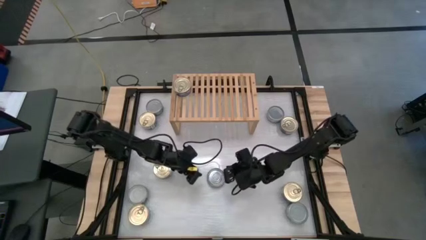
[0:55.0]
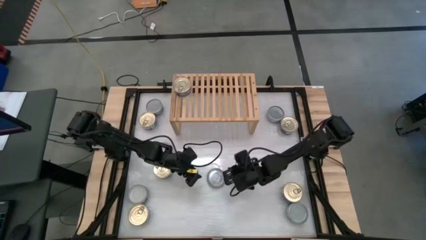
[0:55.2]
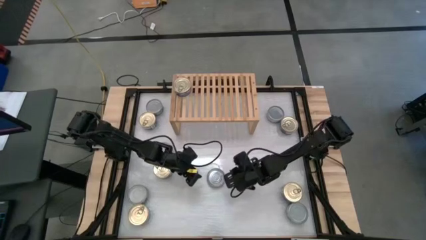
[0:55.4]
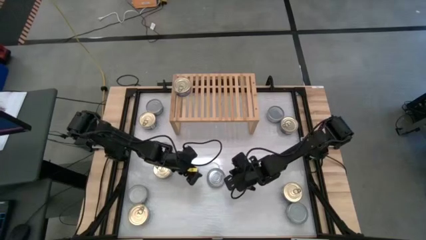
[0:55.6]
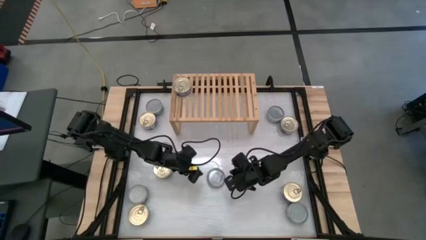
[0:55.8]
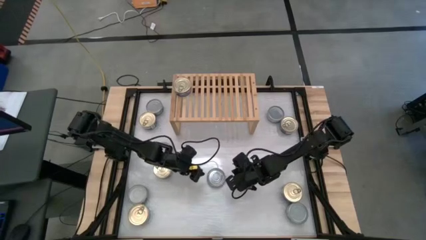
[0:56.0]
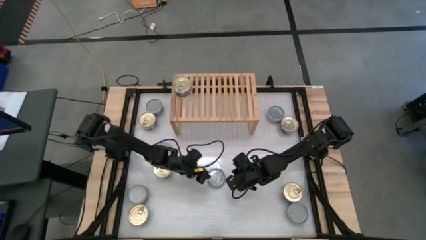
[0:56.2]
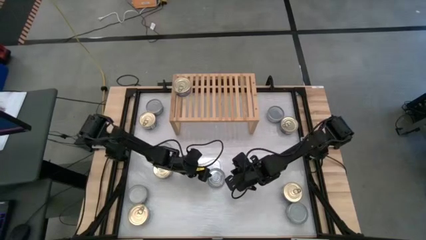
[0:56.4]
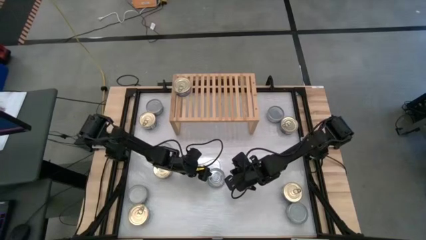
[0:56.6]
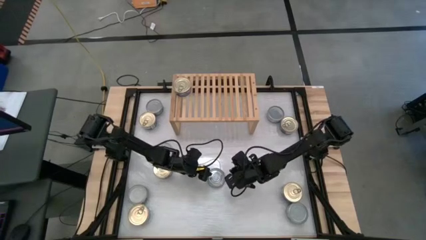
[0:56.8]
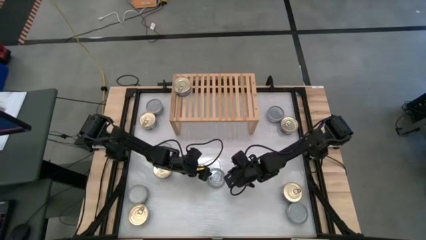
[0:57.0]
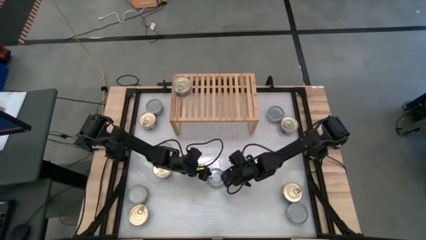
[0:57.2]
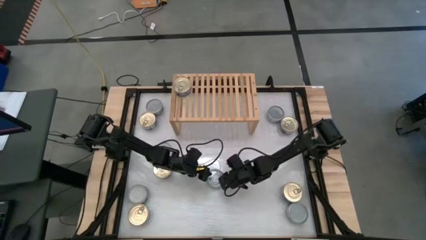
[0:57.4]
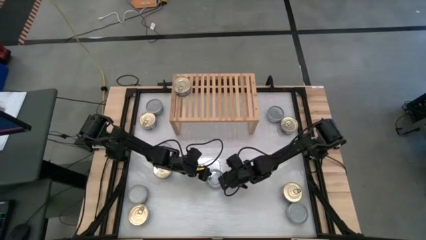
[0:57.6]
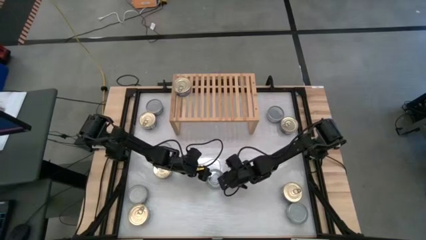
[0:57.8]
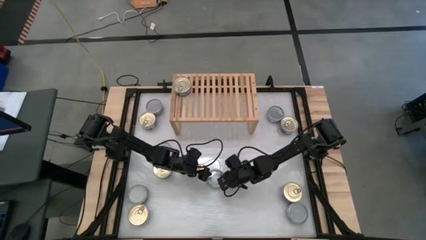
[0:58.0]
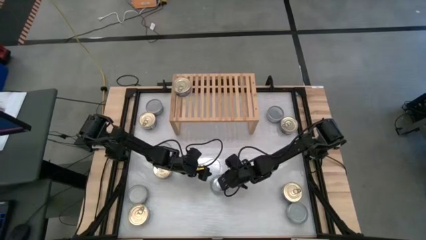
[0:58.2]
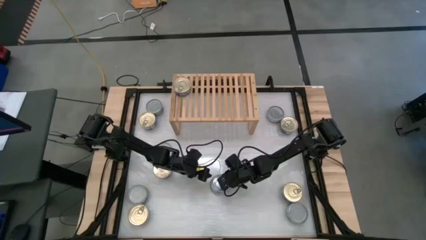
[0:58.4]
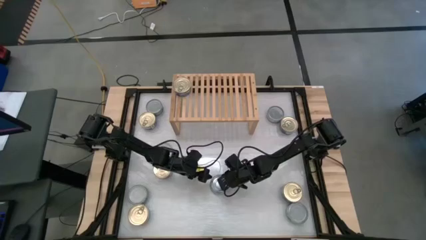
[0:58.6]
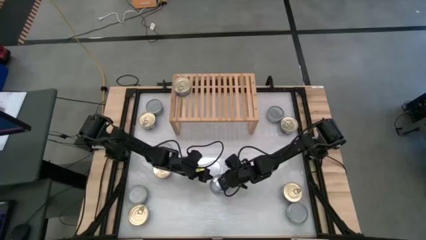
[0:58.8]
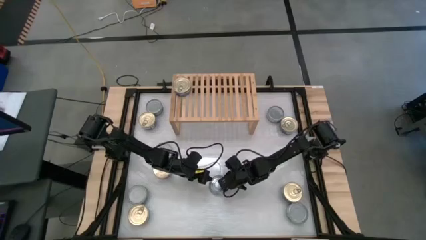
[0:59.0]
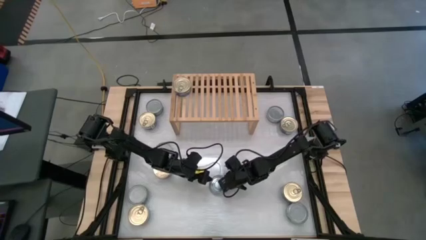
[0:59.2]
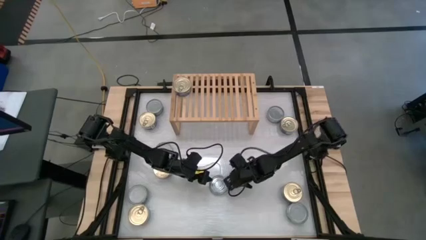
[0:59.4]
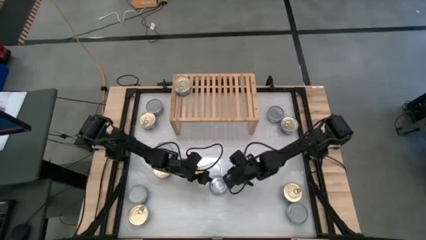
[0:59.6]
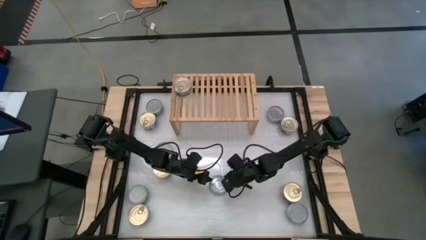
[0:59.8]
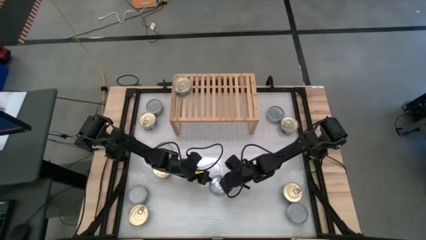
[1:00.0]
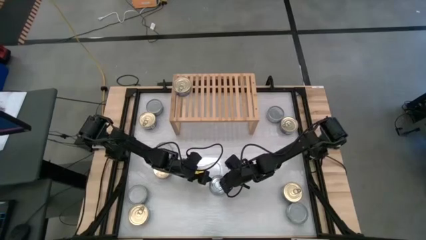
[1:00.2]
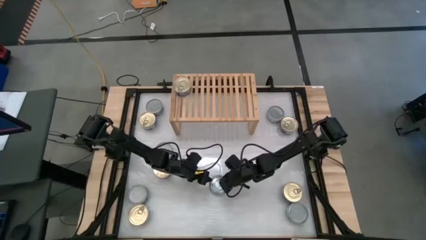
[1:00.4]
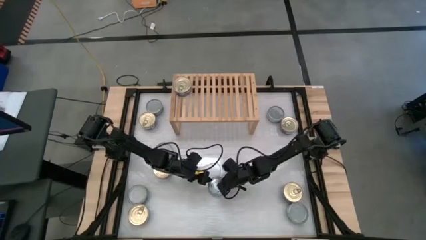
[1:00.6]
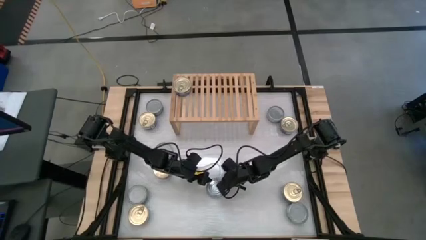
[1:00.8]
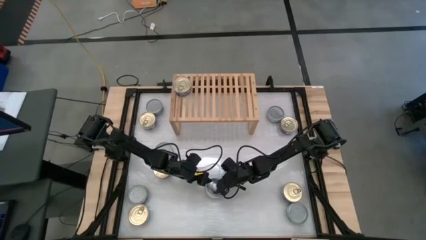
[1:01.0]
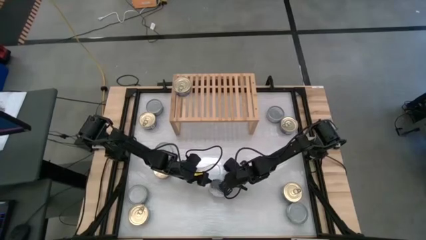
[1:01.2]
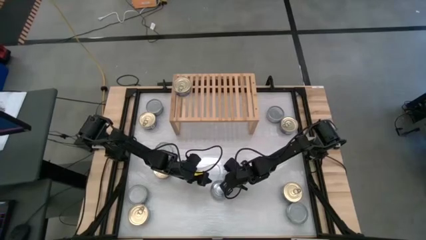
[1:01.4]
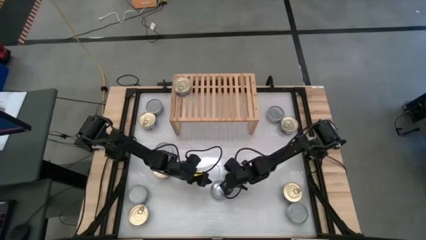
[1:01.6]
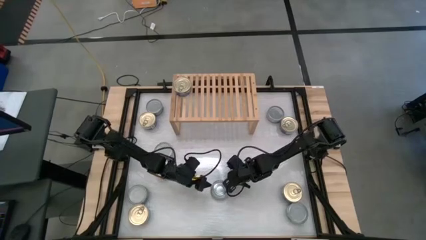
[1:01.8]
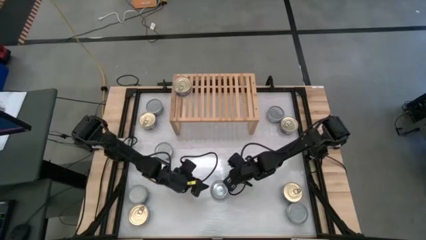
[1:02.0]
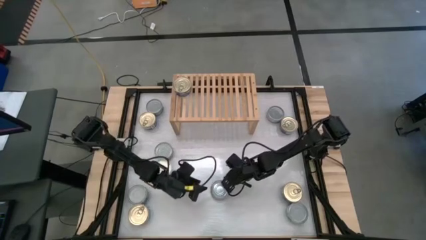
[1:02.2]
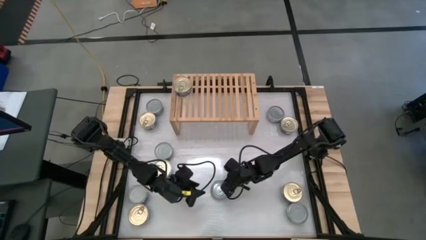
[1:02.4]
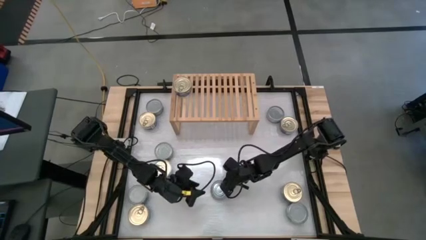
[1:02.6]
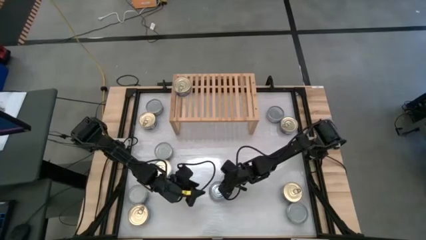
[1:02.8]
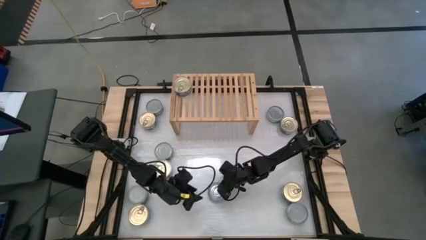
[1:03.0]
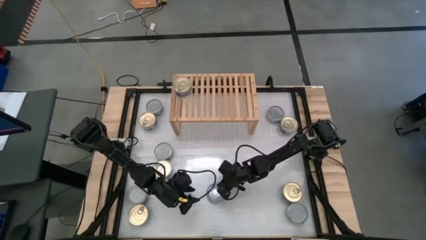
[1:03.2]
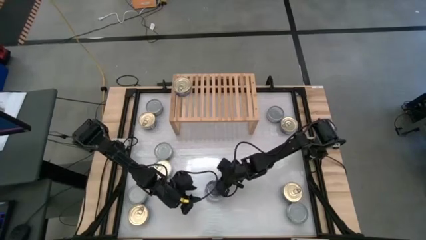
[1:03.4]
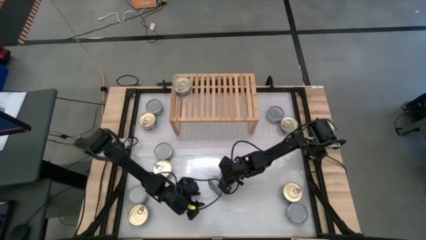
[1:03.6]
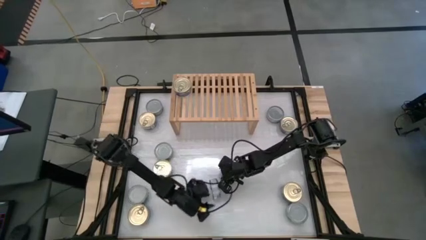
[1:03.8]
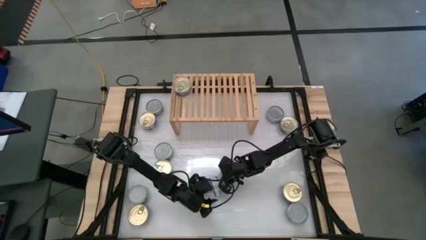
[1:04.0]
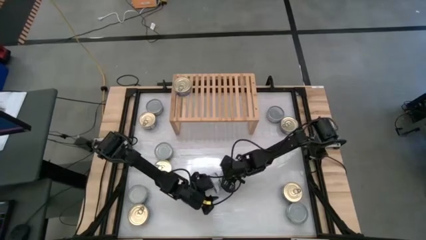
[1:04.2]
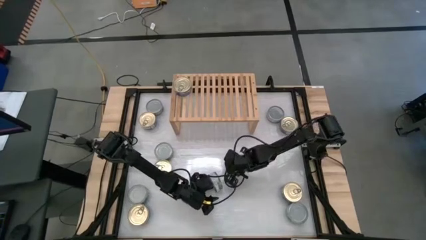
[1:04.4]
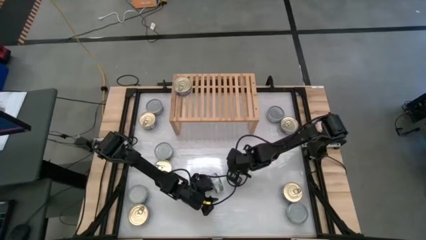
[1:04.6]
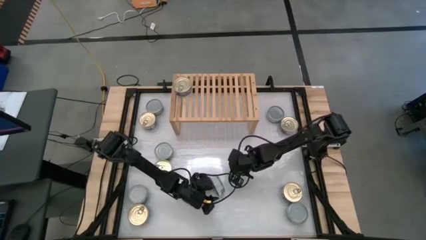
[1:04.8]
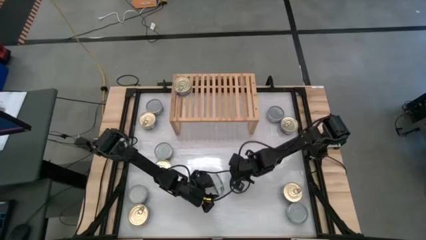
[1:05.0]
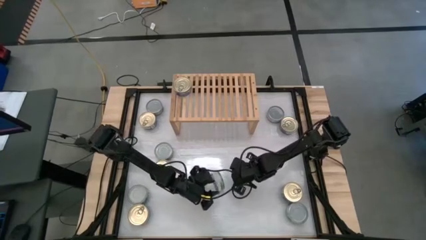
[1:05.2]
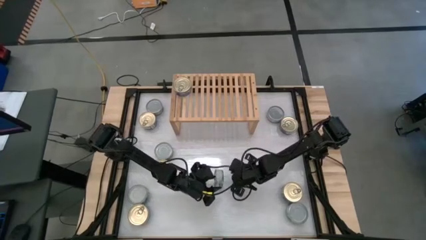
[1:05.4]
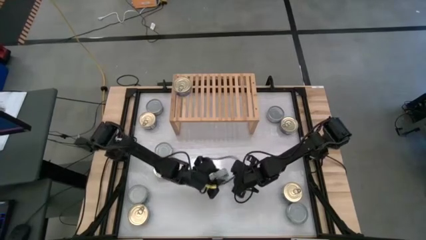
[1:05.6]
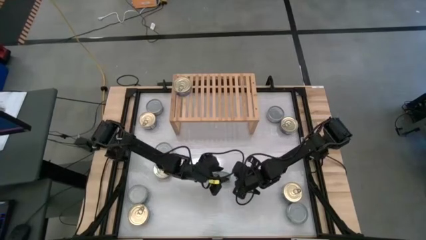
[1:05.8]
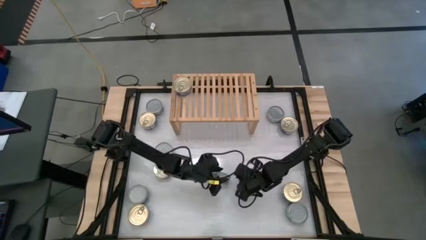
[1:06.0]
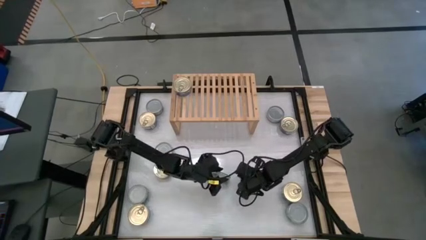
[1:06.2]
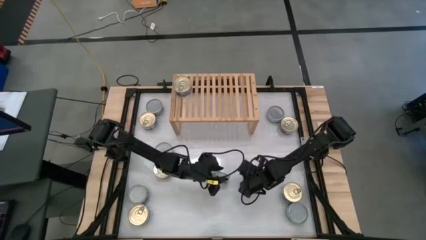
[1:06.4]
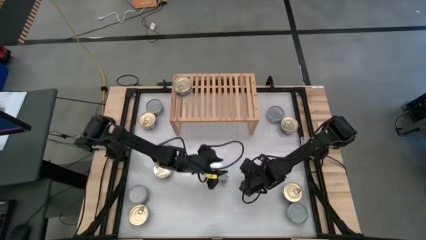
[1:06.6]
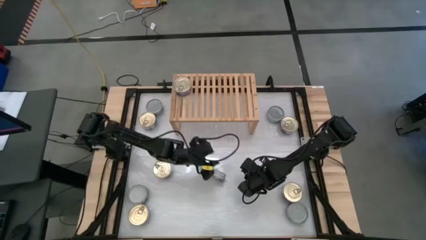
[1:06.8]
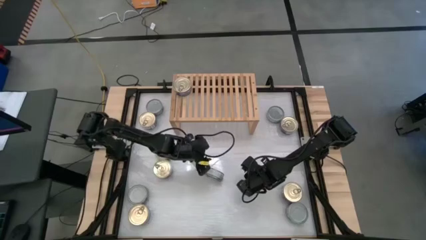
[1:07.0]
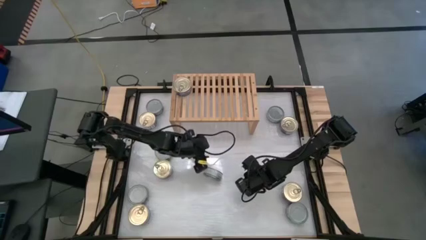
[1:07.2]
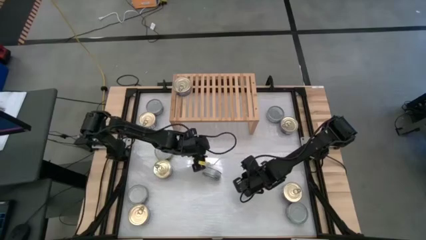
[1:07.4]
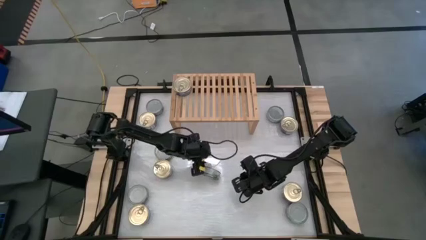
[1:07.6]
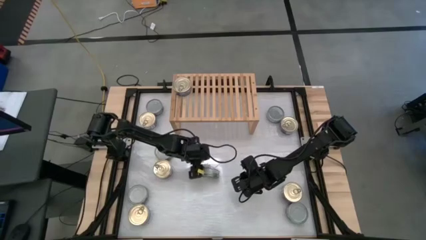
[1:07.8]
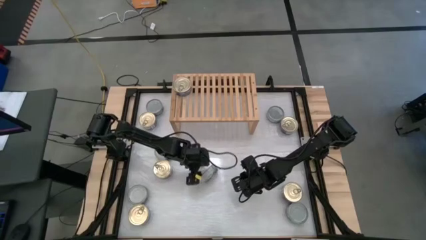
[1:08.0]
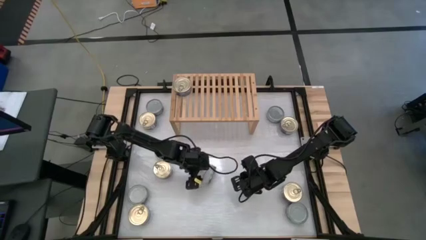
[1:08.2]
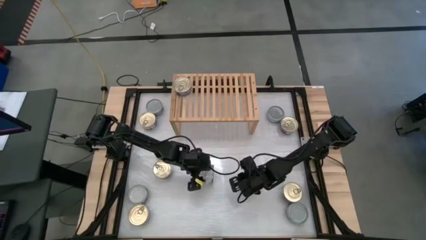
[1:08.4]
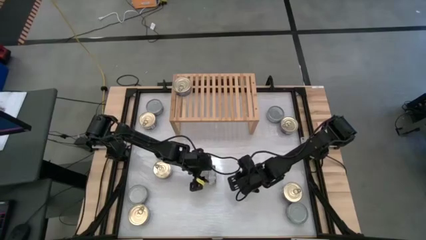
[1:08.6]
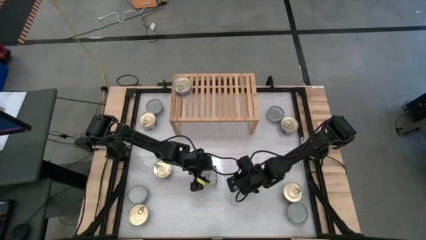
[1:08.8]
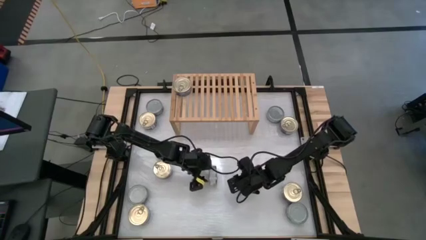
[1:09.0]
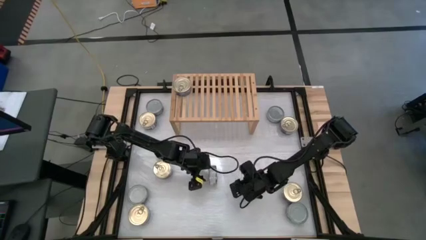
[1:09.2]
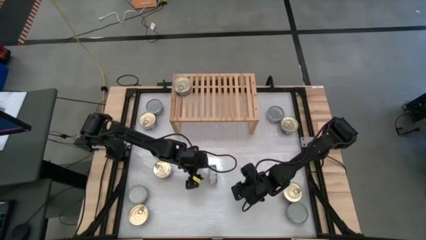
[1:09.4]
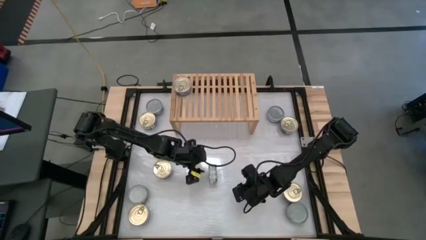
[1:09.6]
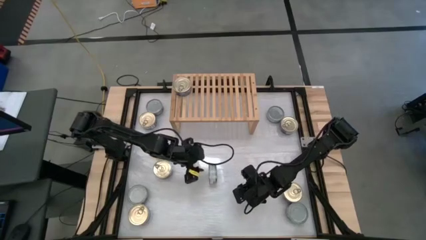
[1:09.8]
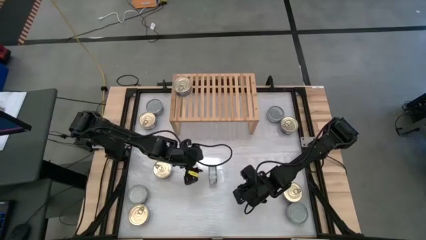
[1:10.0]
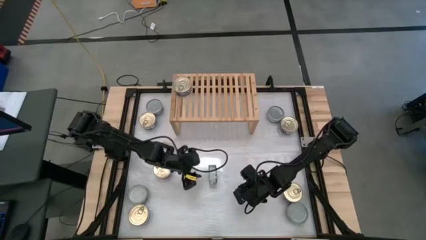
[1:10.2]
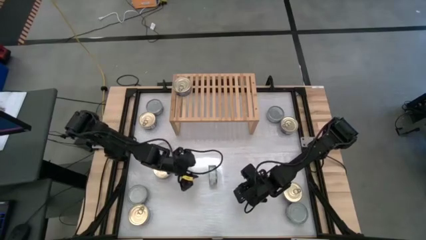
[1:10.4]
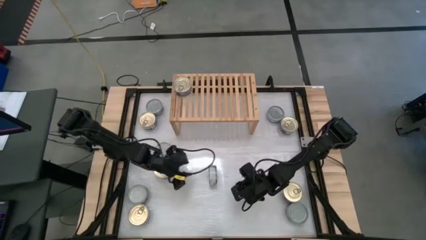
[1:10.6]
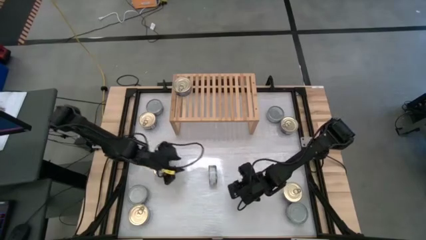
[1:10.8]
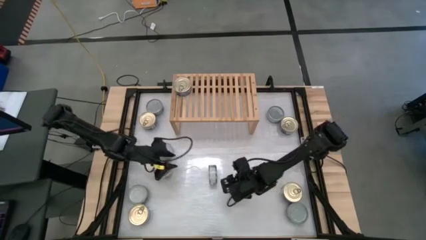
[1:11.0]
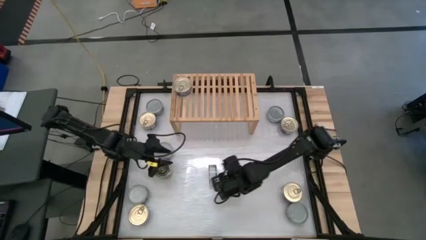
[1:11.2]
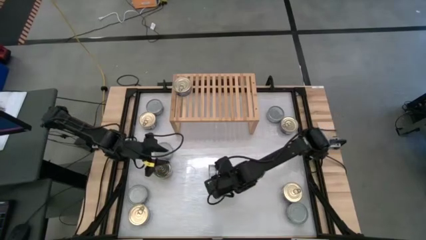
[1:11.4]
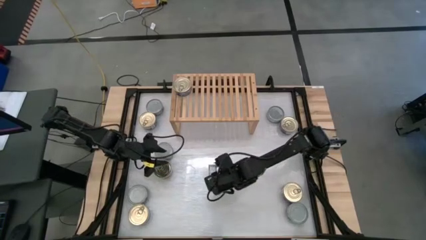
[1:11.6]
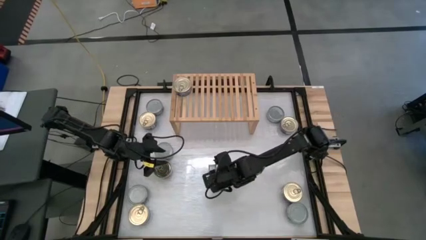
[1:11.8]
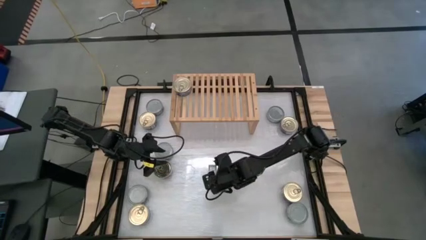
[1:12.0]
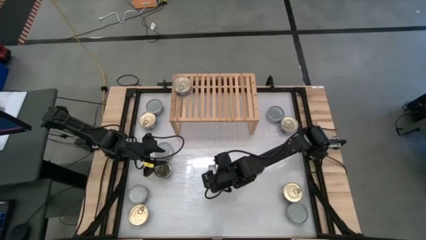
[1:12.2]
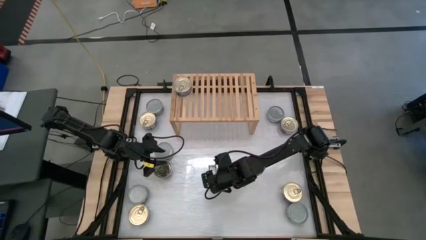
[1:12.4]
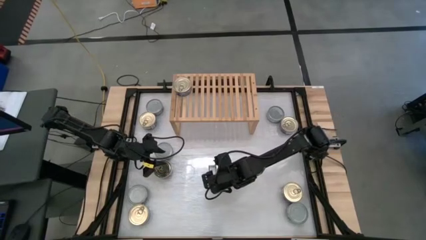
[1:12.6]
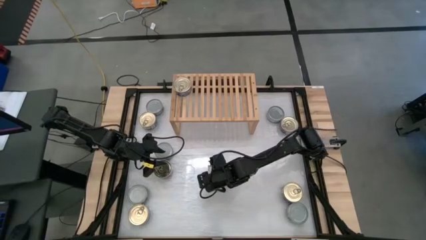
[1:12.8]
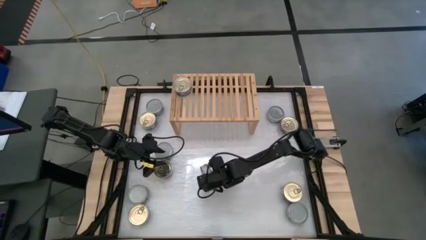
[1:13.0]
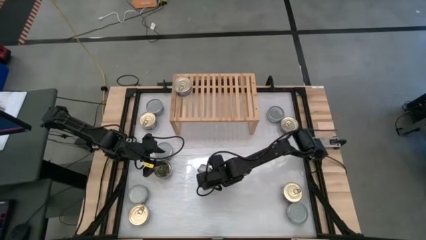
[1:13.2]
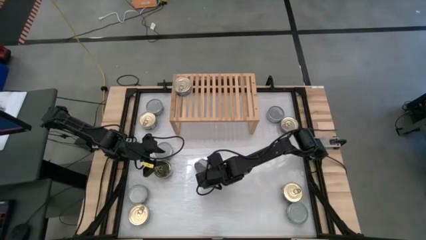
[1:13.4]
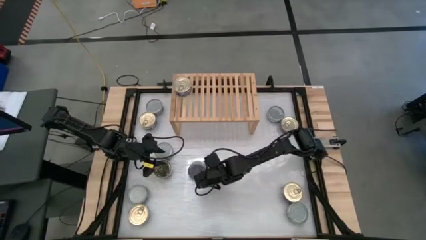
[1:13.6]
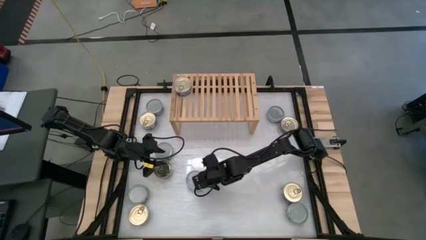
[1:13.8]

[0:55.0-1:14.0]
Task: Stack canned seafood by type on shelf
Put the green tuna can on the shelf
